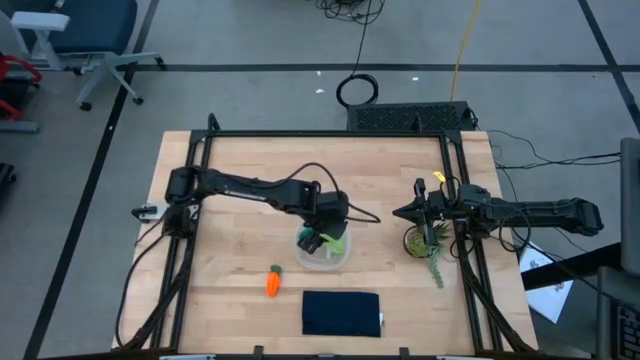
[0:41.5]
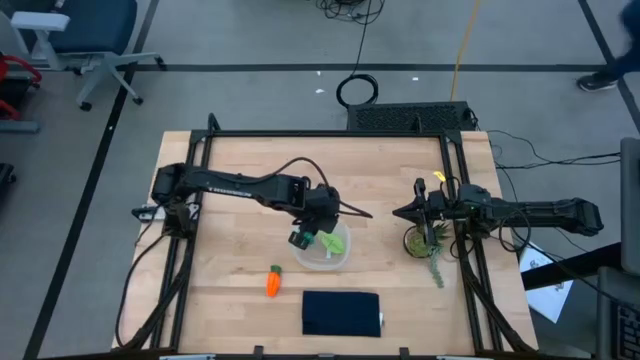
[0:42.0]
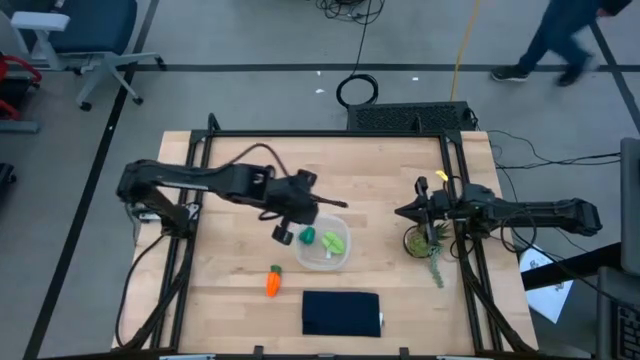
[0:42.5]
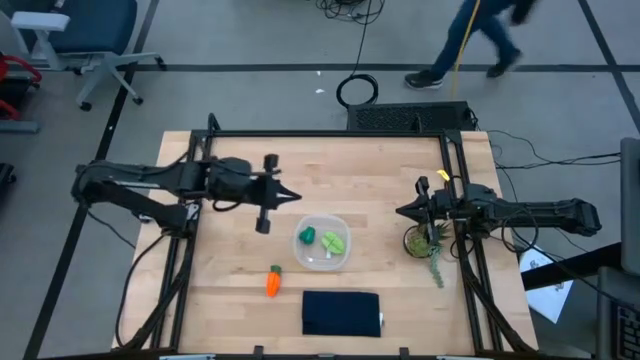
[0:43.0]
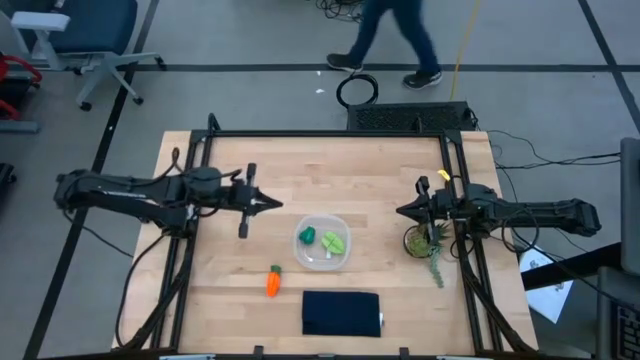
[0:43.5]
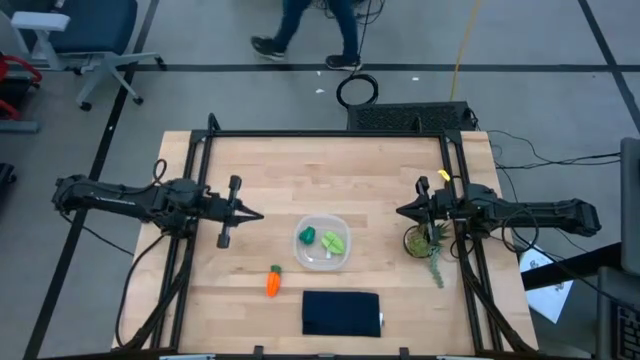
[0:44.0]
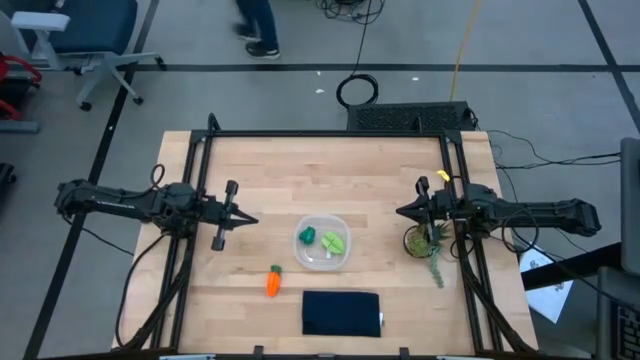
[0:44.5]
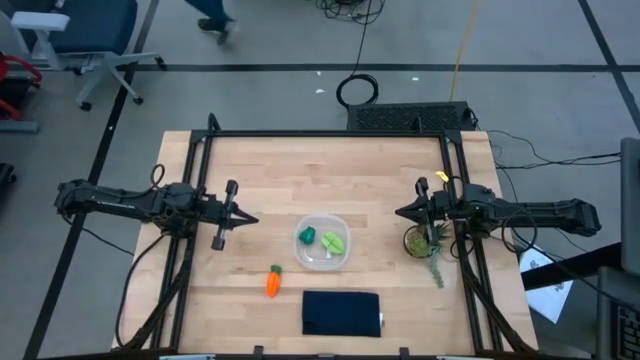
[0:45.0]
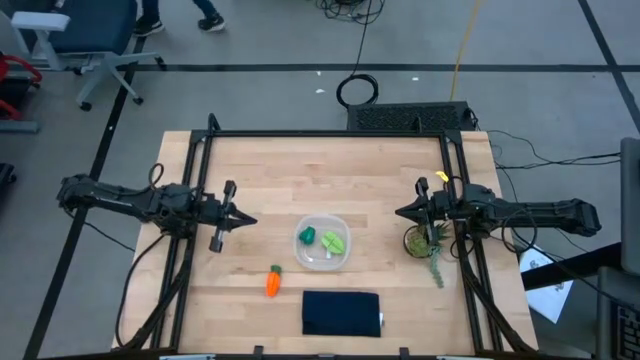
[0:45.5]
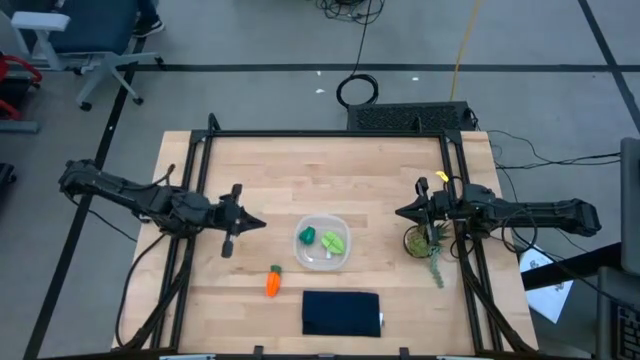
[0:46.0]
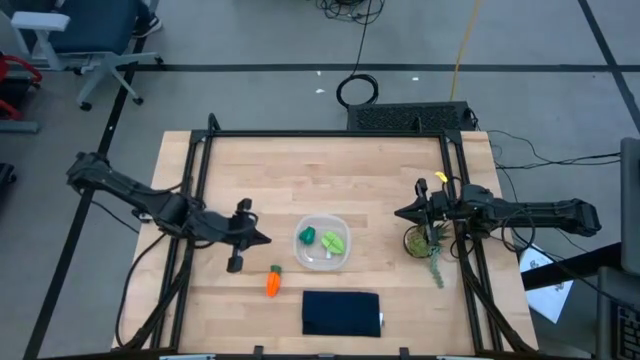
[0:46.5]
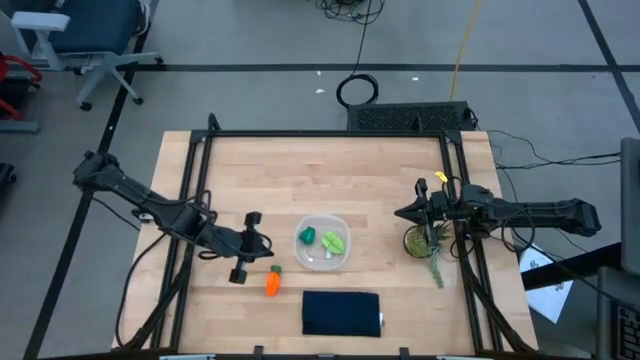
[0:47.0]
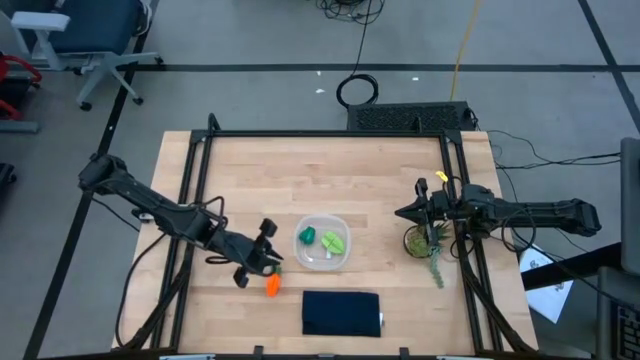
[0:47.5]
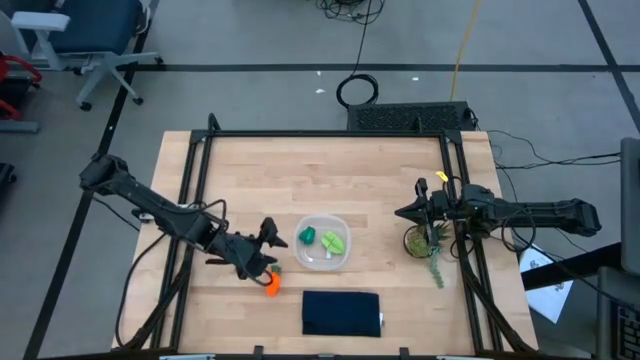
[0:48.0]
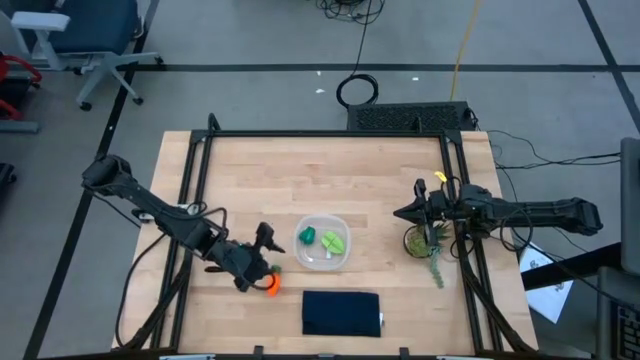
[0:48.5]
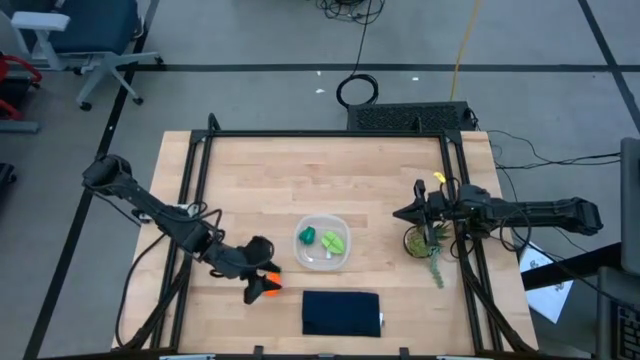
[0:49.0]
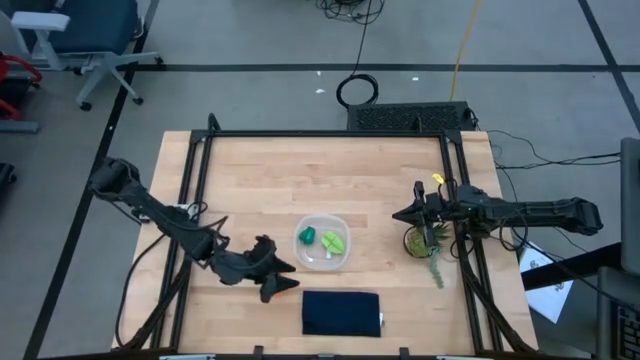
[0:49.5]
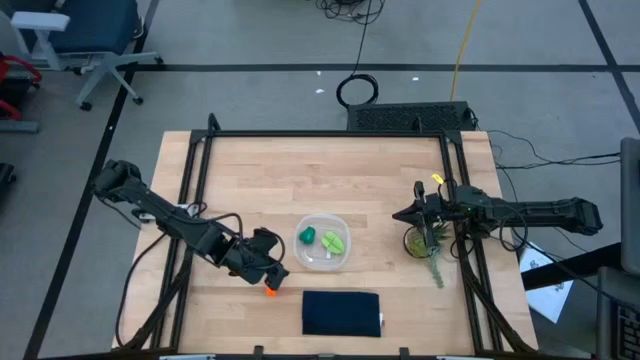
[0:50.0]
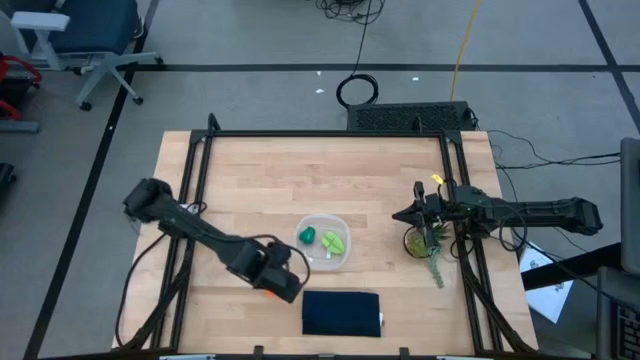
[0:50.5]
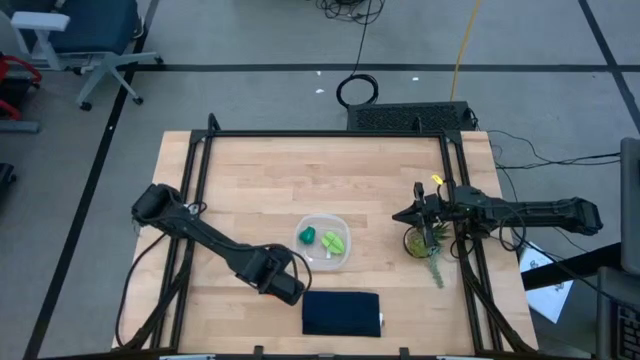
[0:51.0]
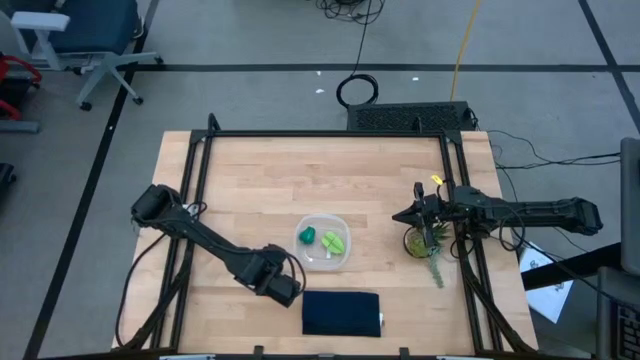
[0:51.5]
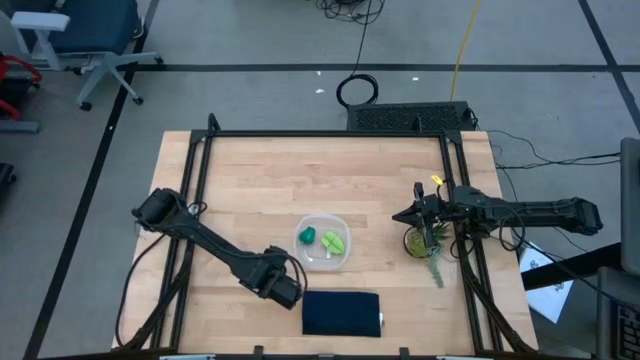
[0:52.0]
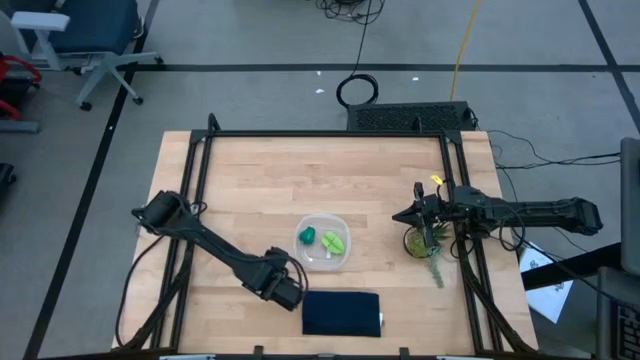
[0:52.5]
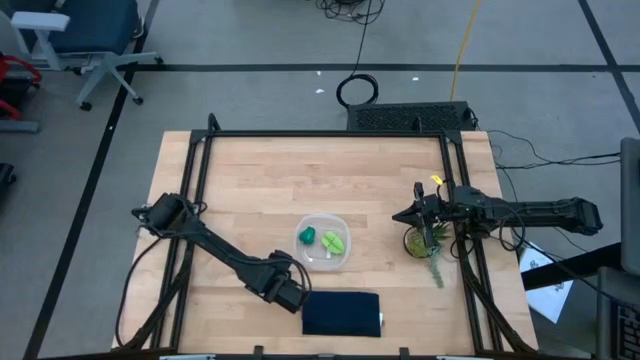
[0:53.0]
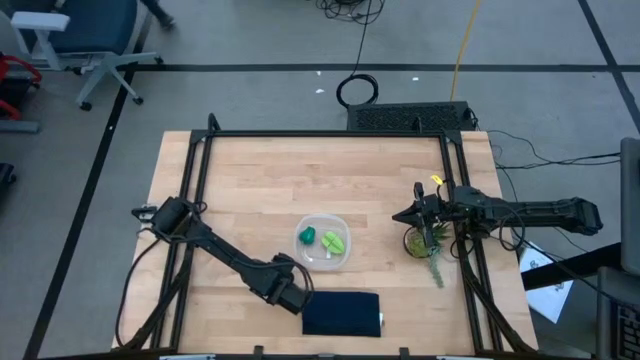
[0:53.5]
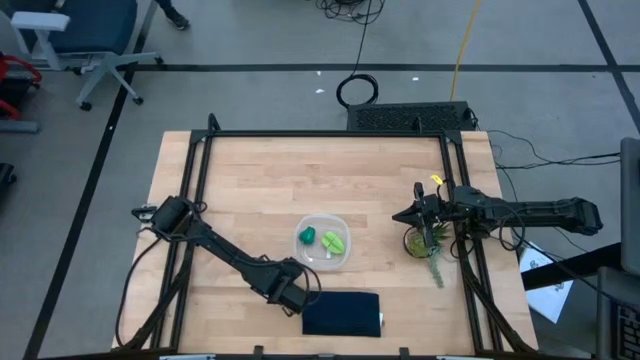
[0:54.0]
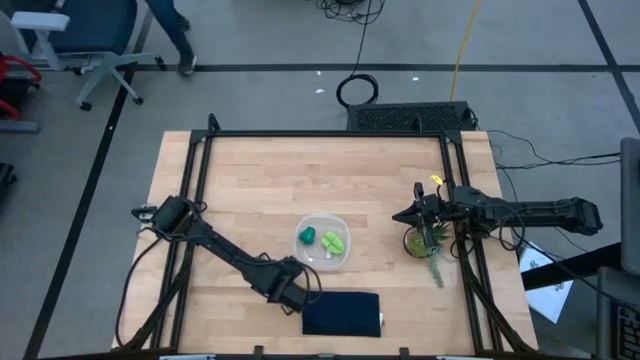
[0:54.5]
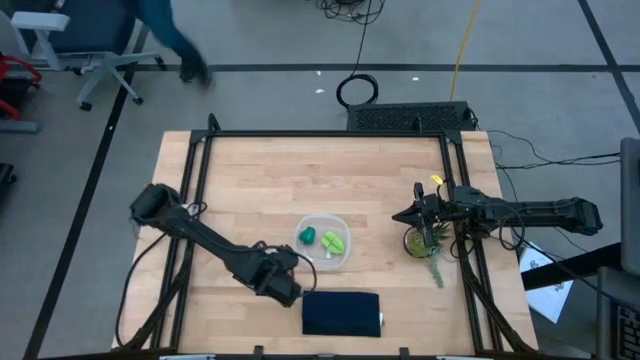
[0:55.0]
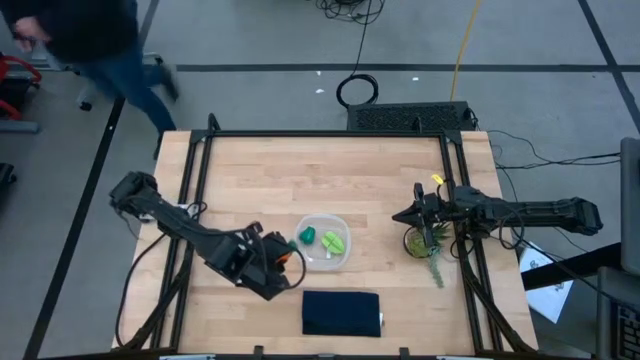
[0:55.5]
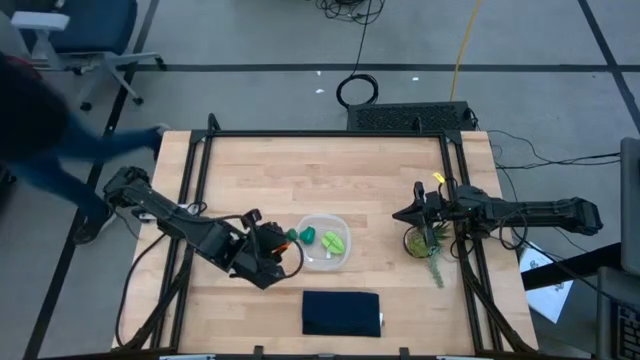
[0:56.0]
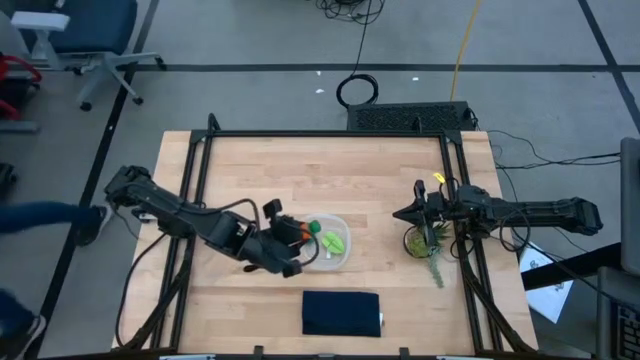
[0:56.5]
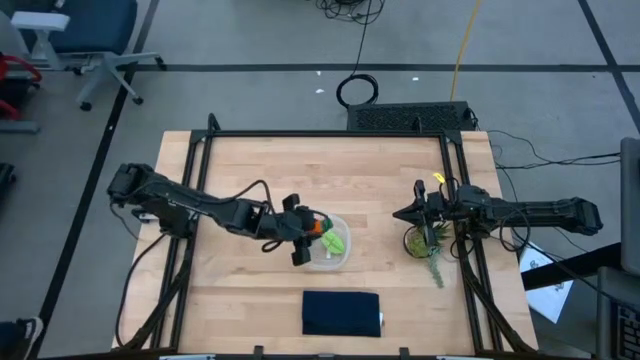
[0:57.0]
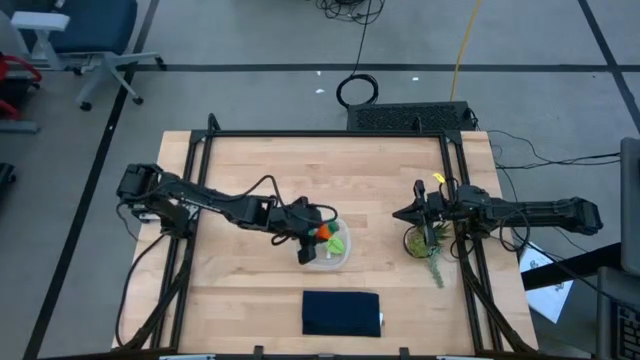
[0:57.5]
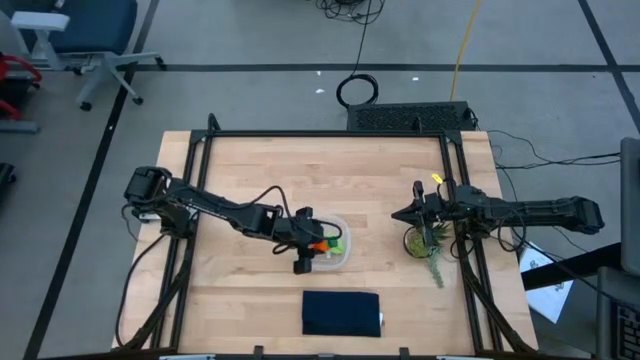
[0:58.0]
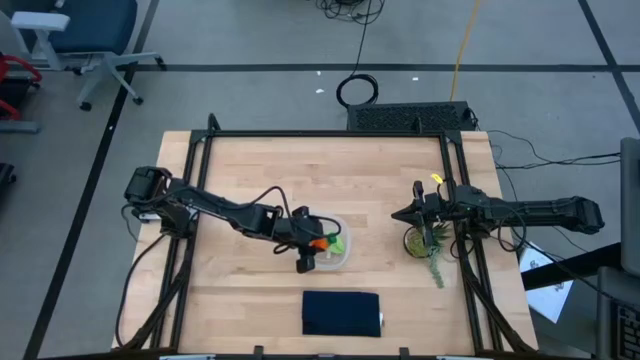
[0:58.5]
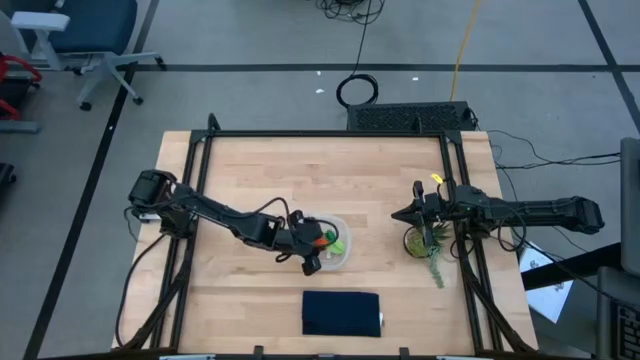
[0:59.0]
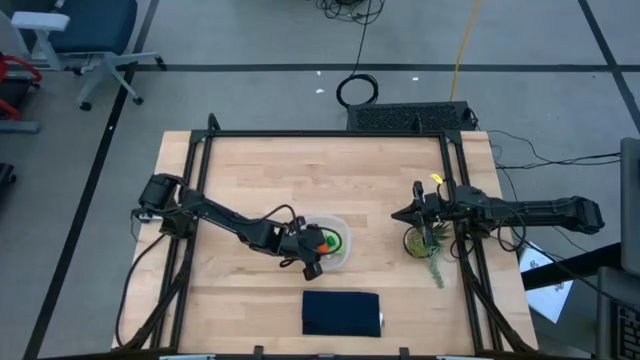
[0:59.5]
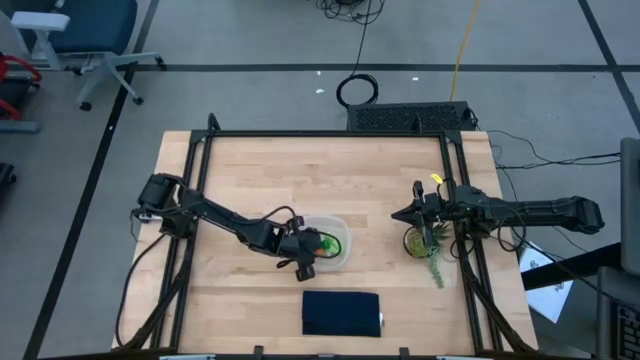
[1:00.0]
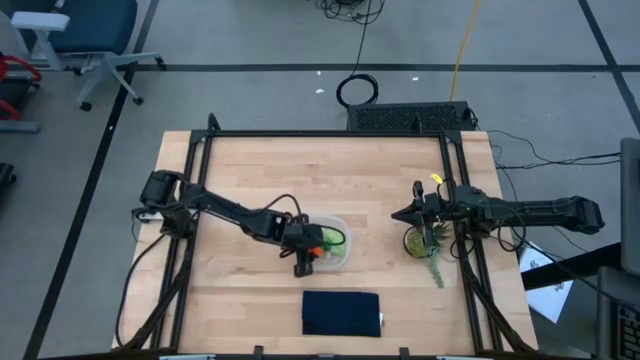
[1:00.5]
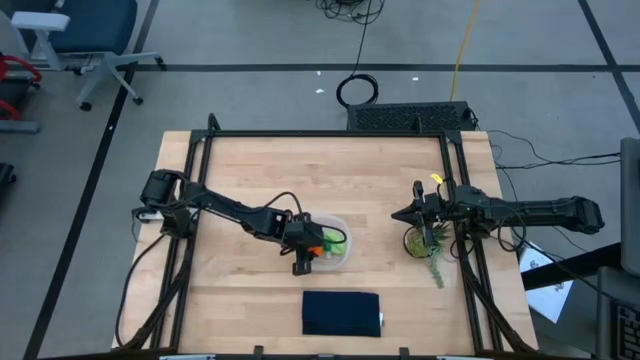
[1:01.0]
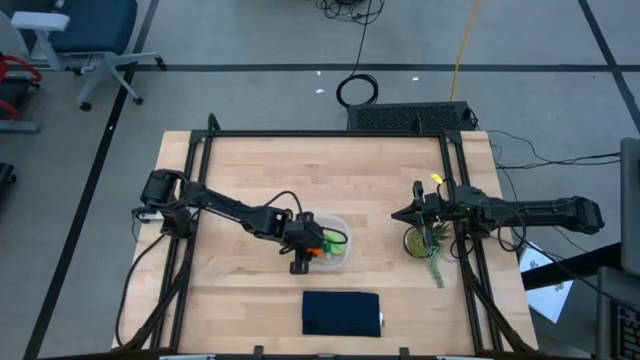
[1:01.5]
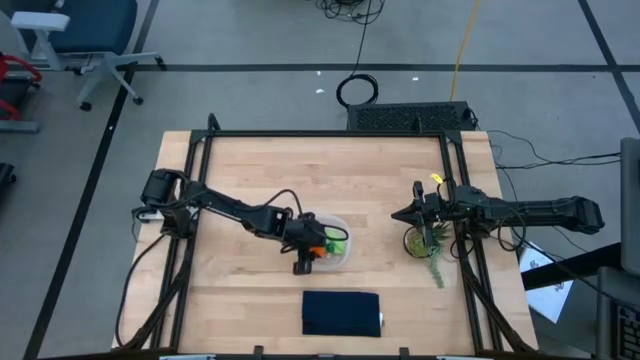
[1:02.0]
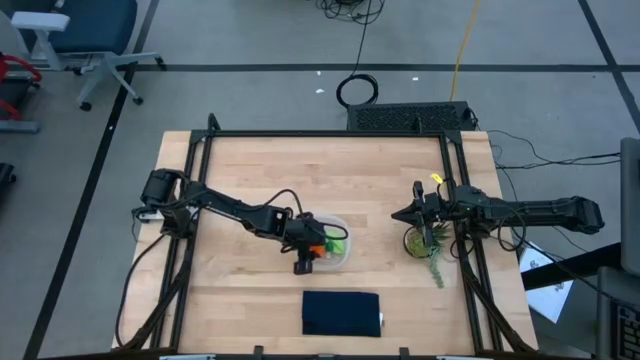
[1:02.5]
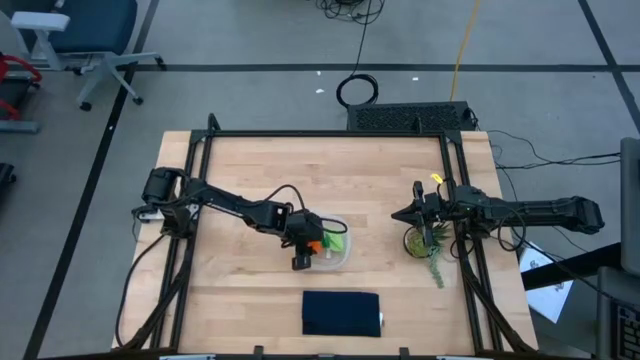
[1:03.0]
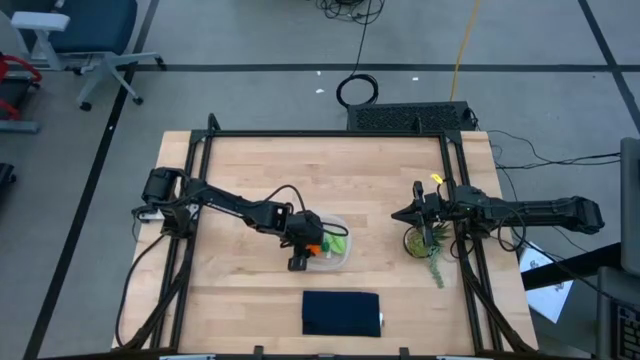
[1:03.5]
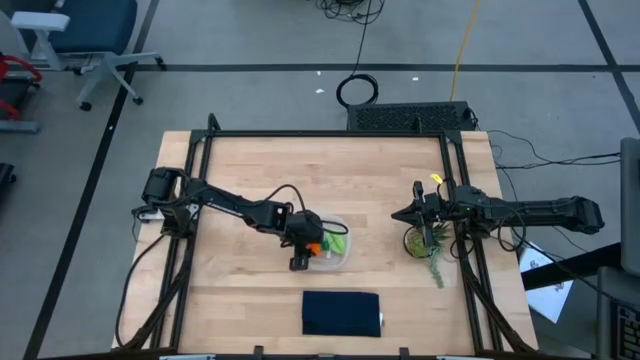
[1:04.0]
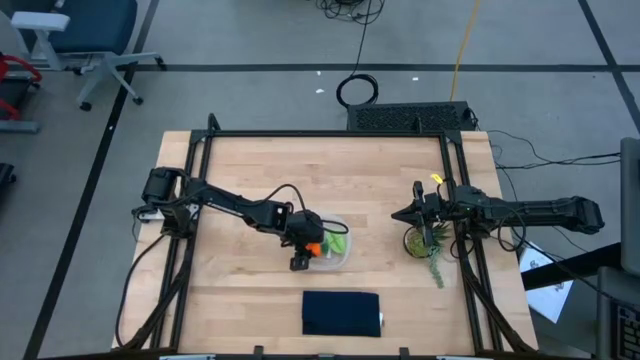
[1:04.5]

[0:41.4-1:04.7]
Task: Pick and placing Produce into tupperware
Put the carrot into the bin
